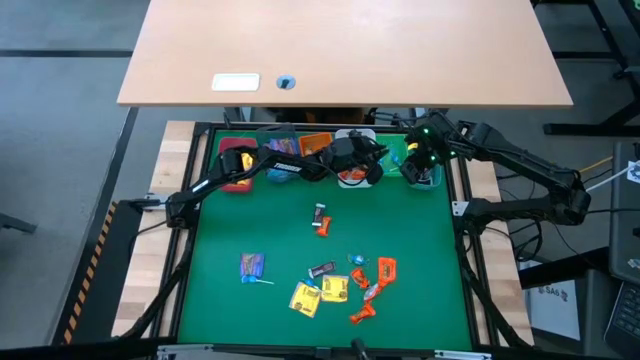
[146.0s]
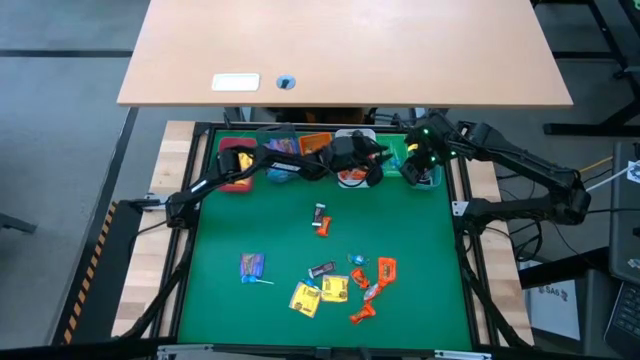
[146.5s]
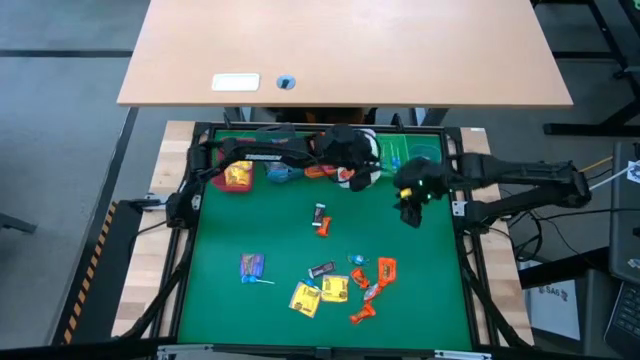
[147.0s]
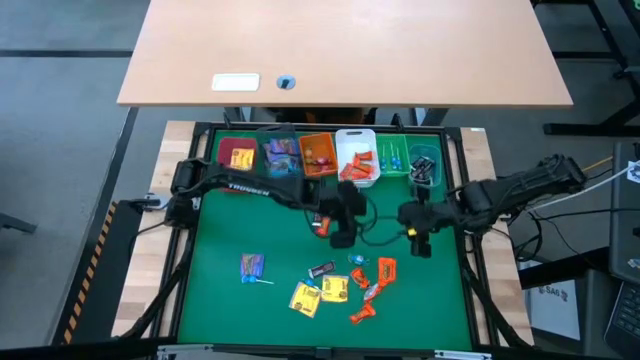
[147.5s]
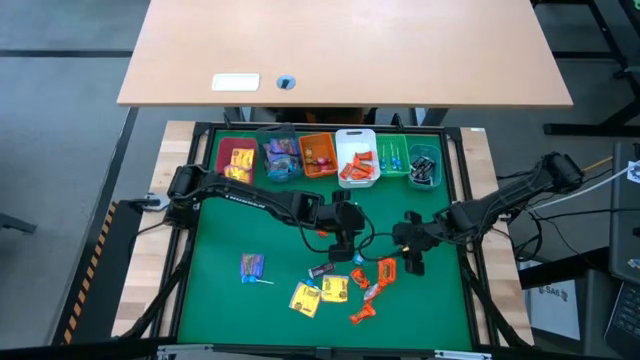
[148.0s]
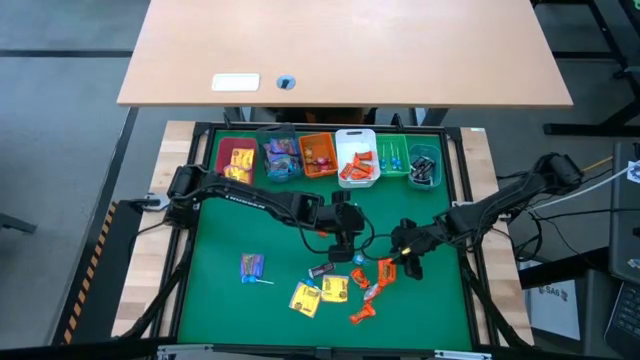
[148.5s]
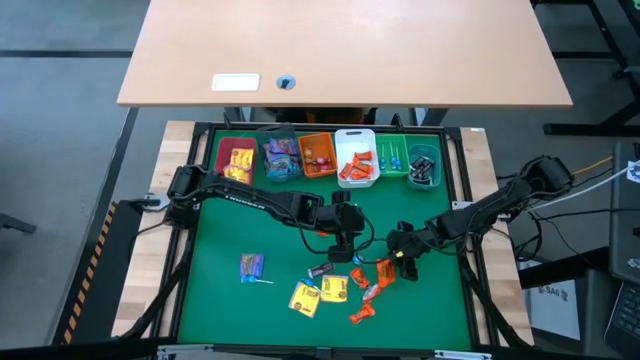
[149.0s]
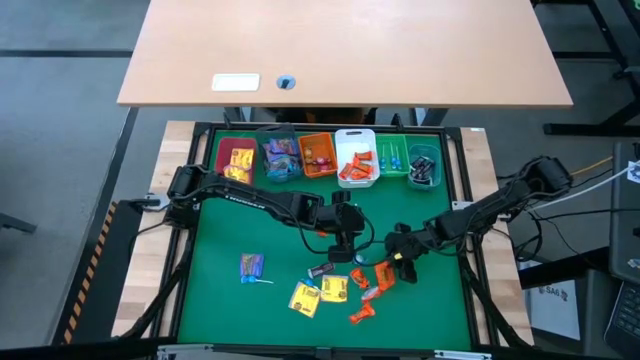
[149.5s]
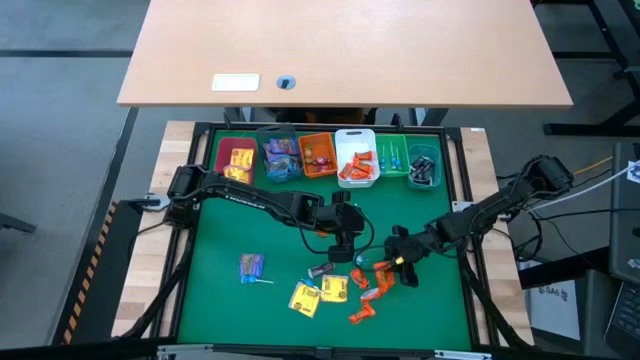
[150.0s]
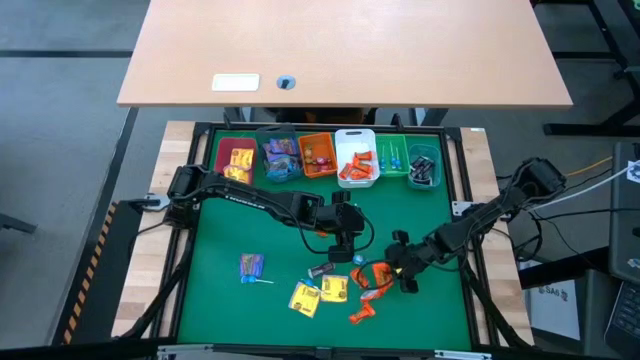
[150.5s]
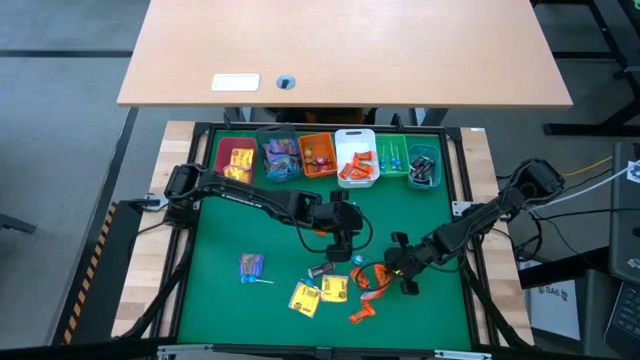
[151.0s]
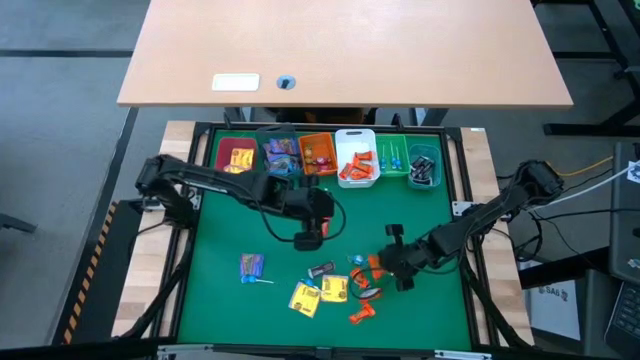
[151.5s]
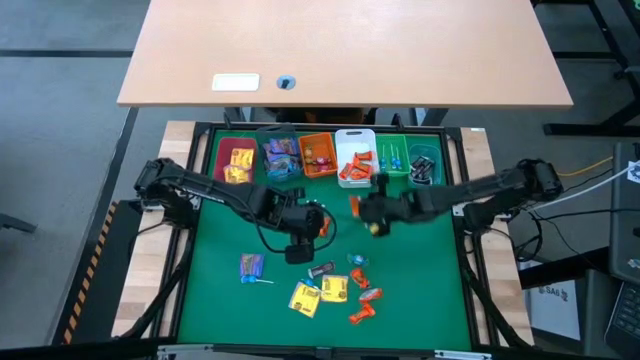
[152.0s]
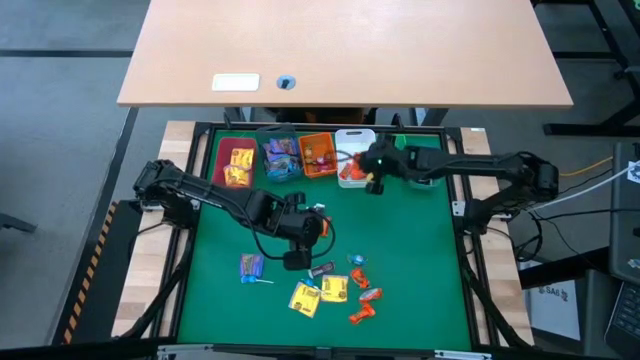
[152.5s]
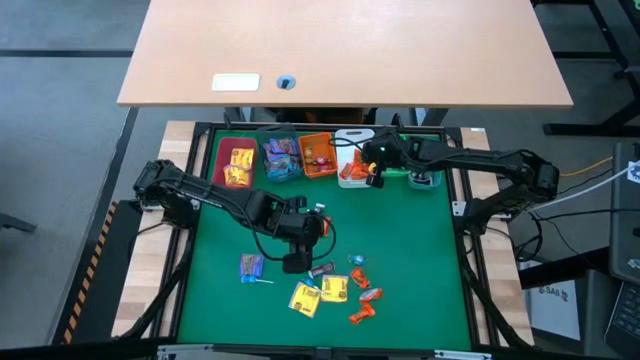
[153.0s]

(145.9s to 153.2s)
Task: Sort candy
Put the orange chocolate into the white bin

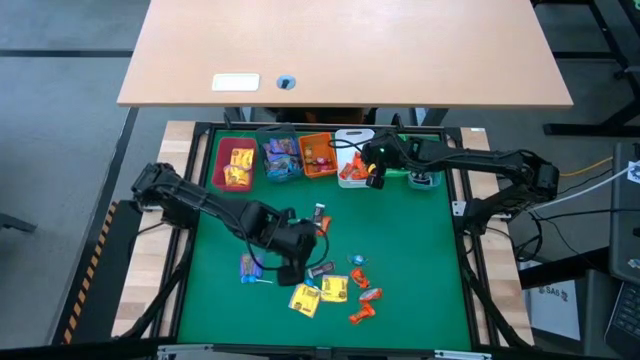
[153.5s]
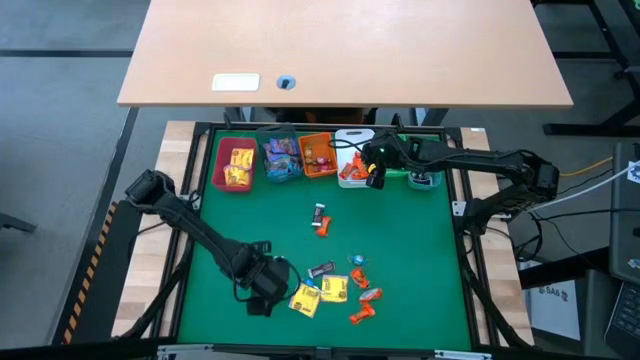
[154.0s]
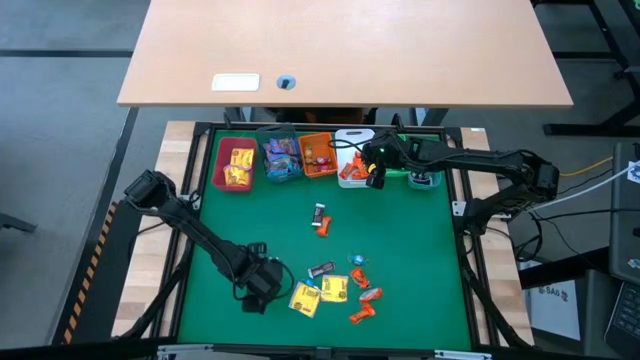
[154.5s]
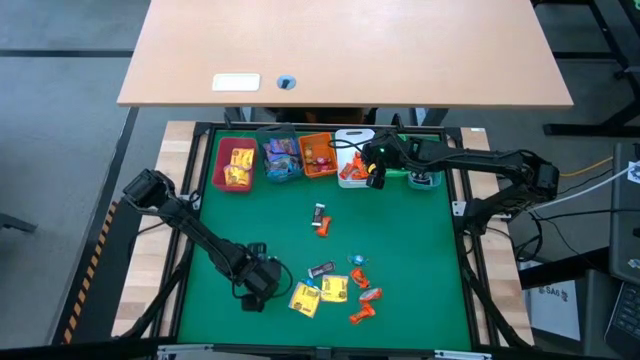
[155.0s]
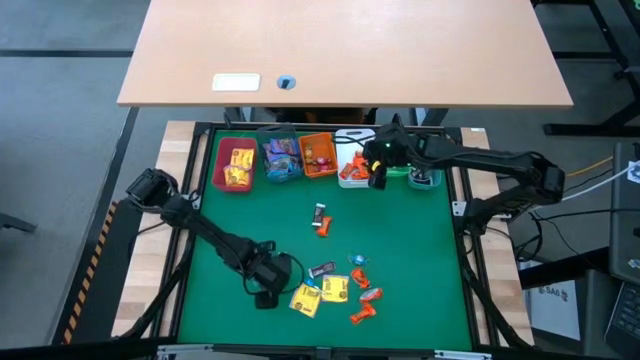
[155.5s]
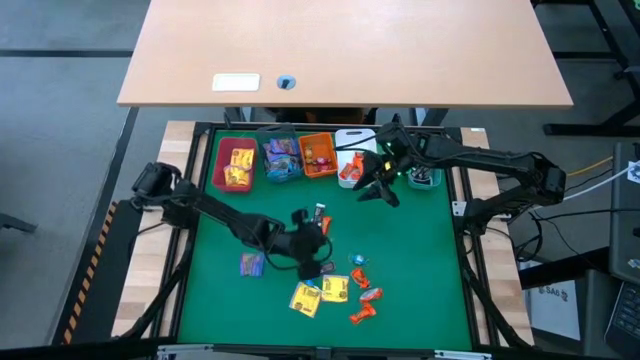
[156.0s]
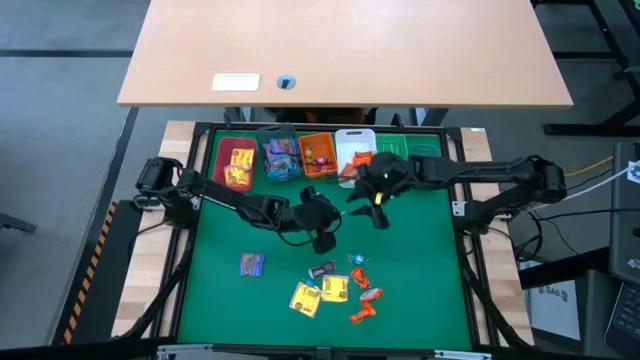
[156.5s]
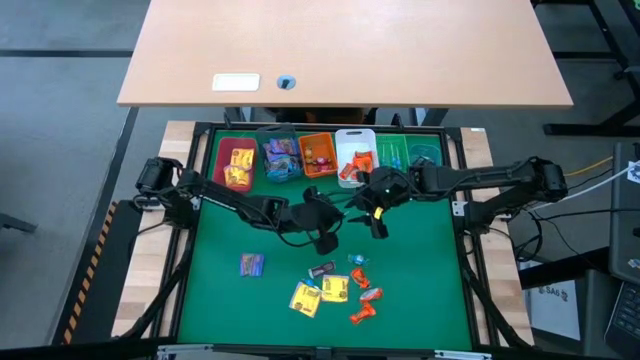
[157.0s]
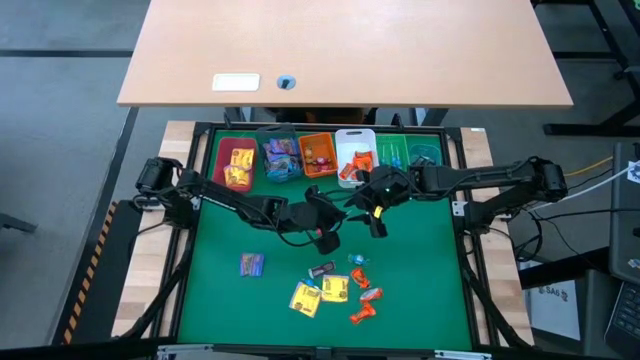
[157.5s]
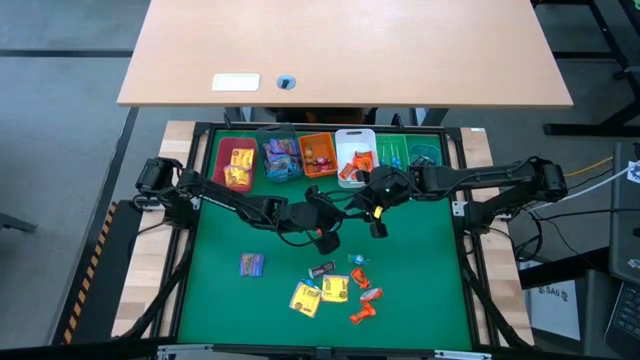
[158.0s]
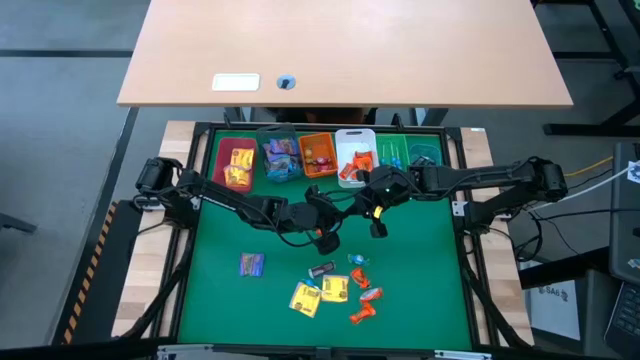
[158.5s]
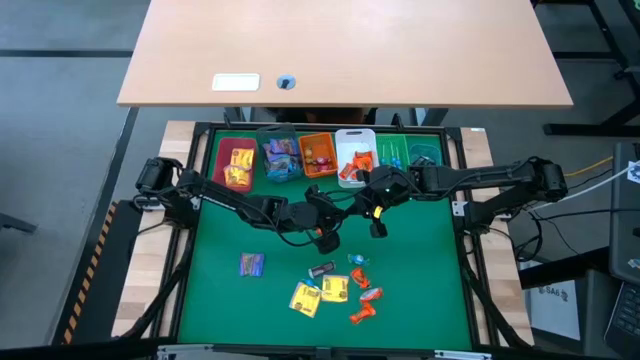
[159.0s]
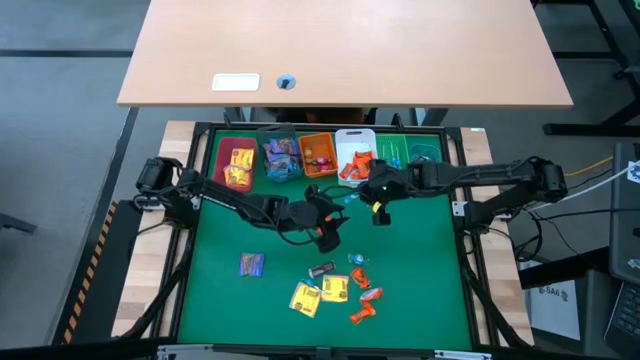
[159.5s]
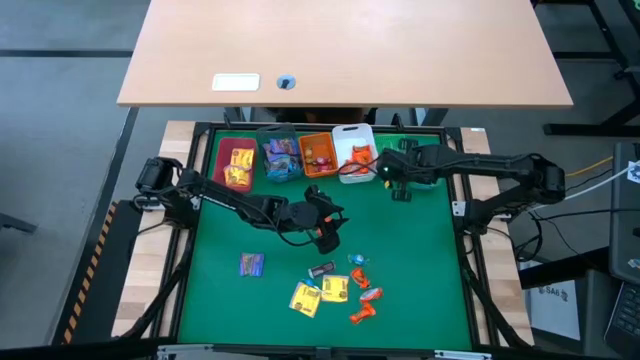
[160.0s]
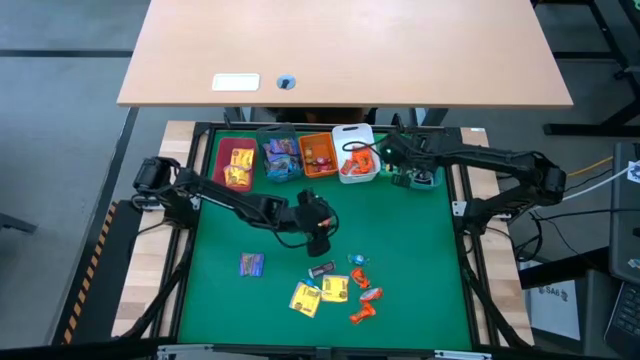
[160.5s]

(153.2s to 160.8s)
Put the blue lollipop into the green bin

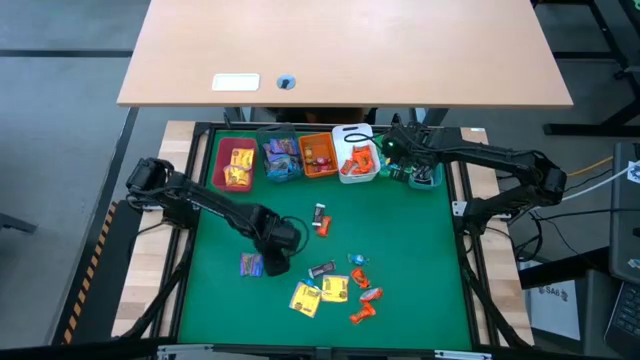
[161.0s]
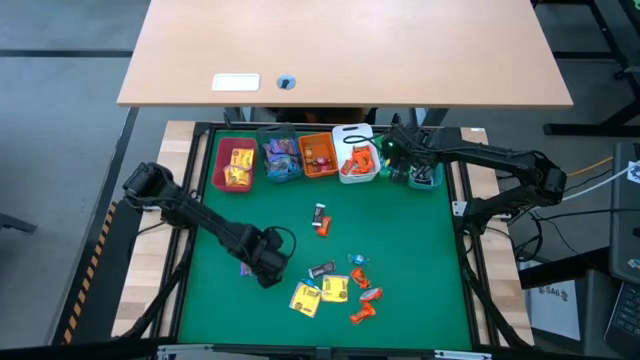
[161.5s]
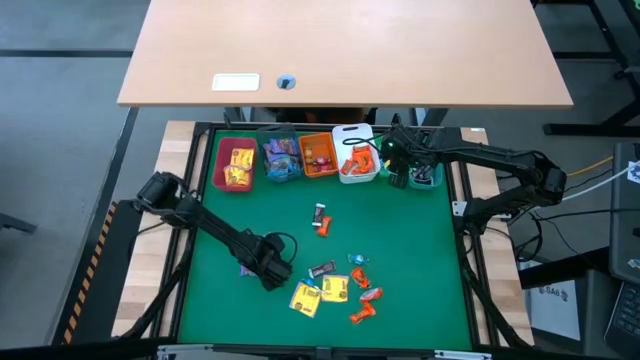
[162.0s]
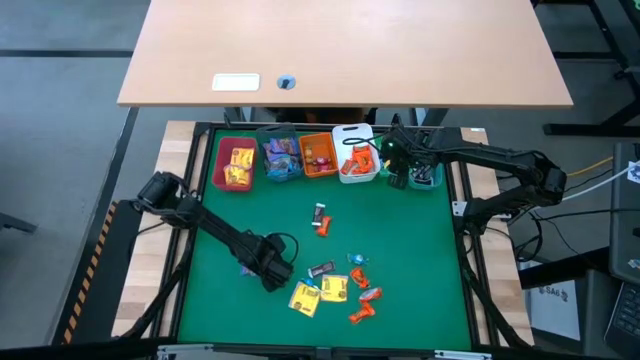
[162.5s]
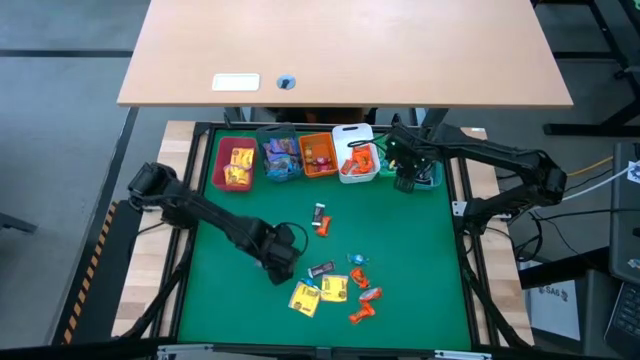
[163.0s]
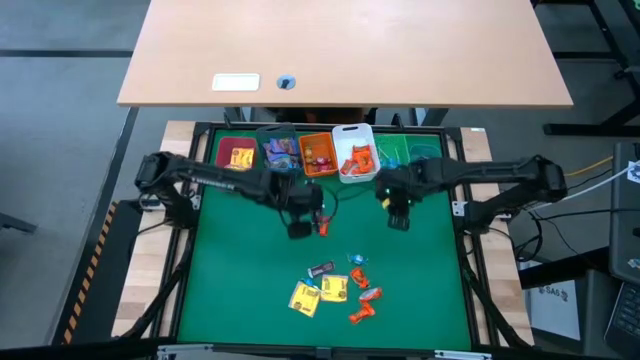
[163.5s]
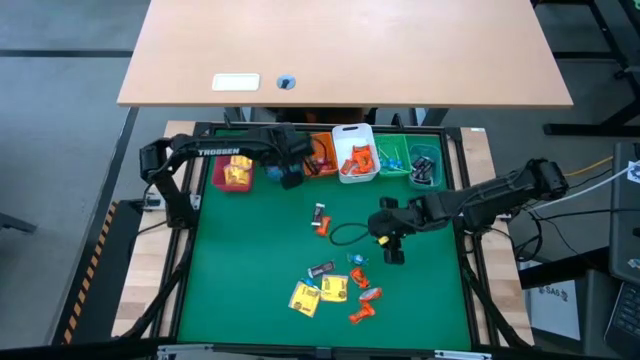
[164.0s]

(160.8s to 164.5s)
Put the purple candy into the black bin

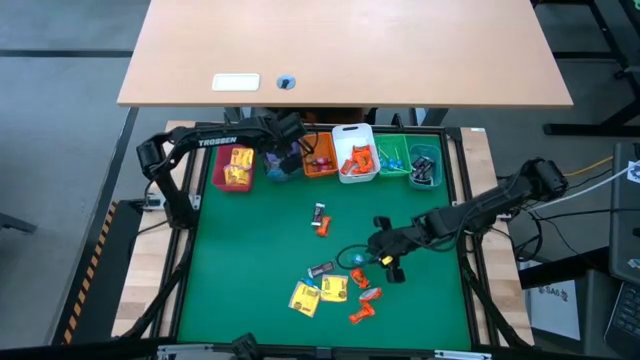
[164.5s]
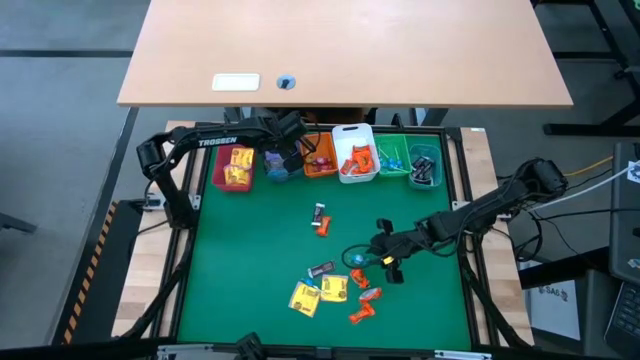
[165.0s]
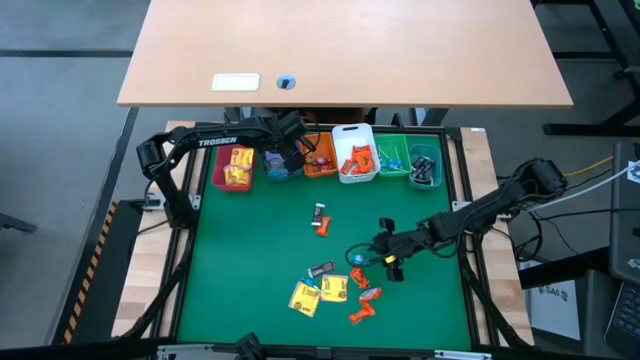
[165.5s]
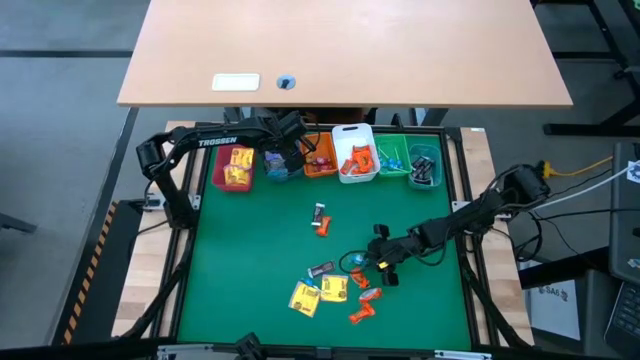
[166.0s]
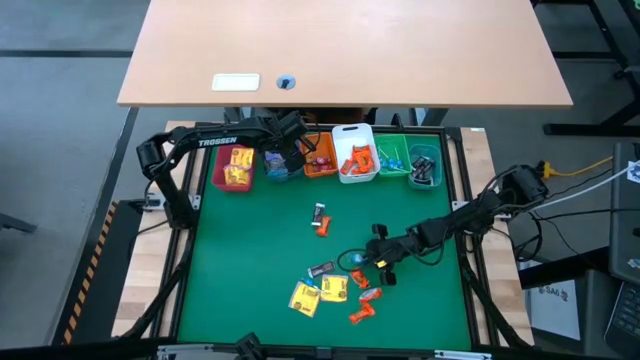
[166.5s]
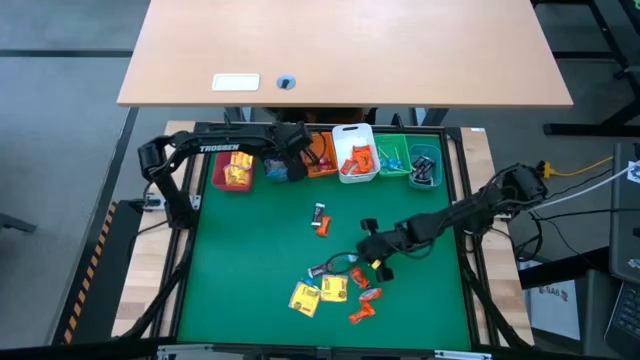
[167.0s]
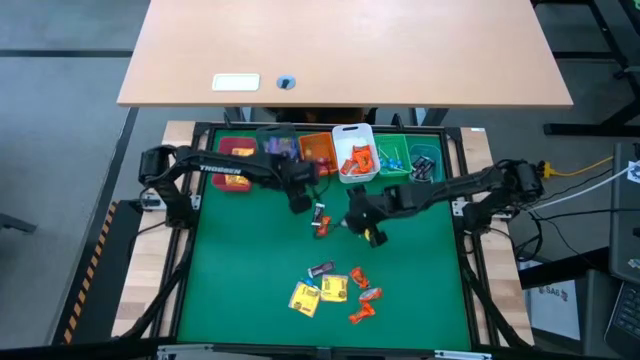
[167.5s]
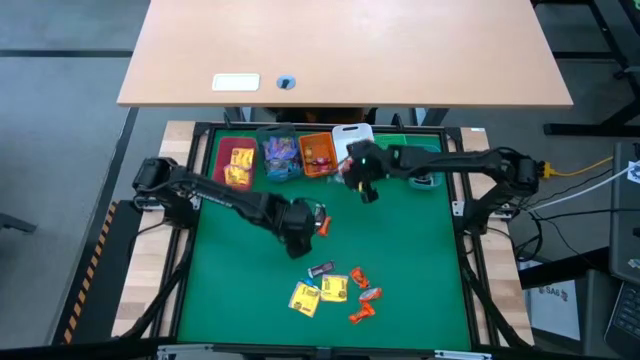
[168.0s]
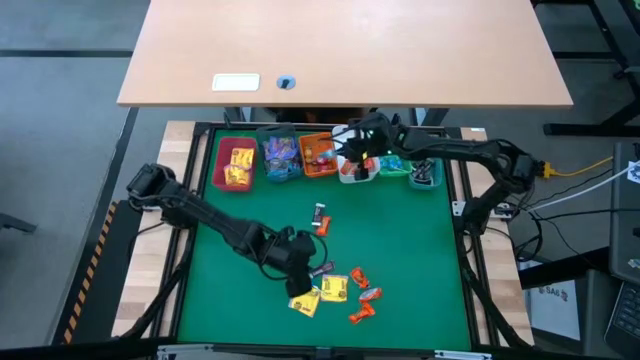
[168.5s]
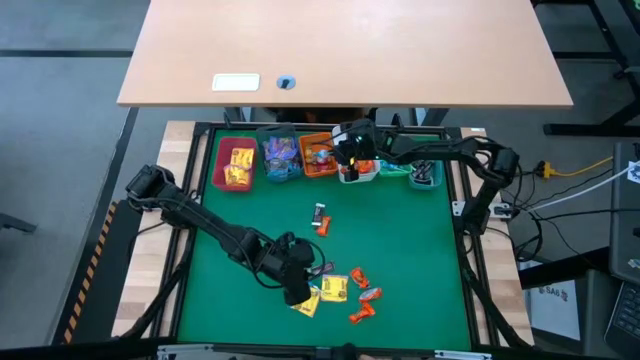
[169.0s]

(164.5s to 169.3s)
Put the blue chocolate into the orange bin
